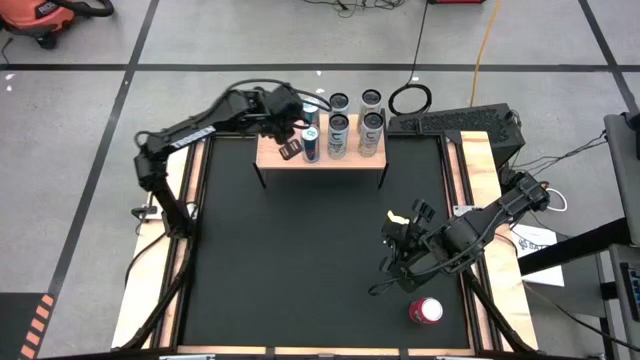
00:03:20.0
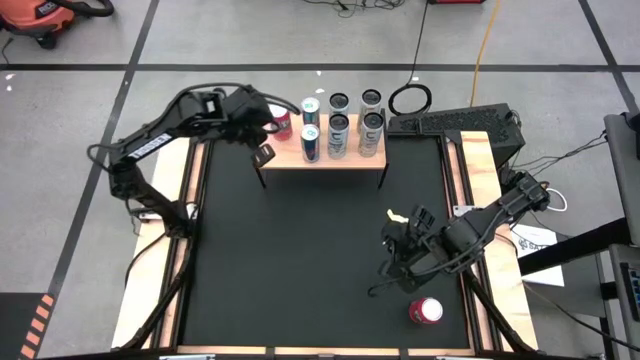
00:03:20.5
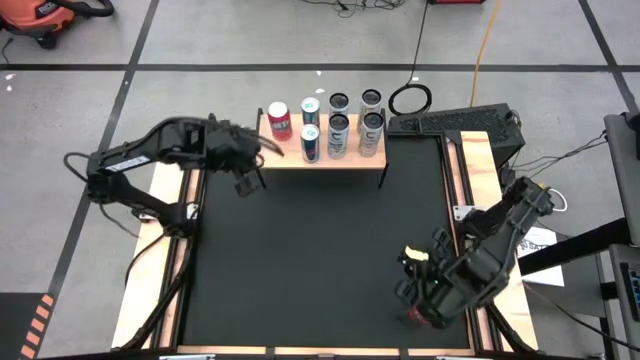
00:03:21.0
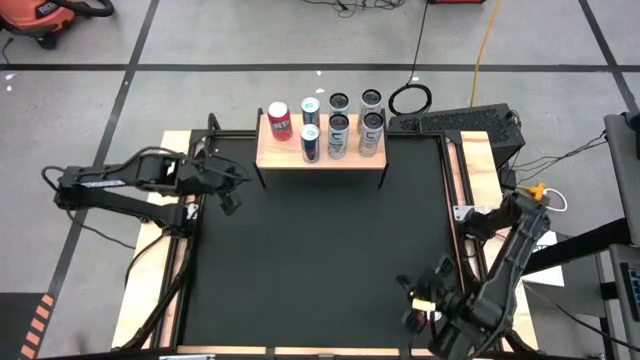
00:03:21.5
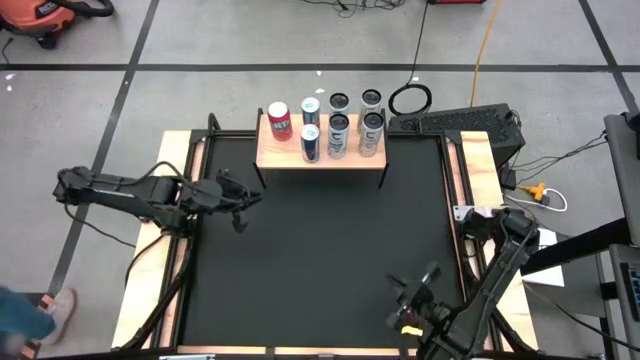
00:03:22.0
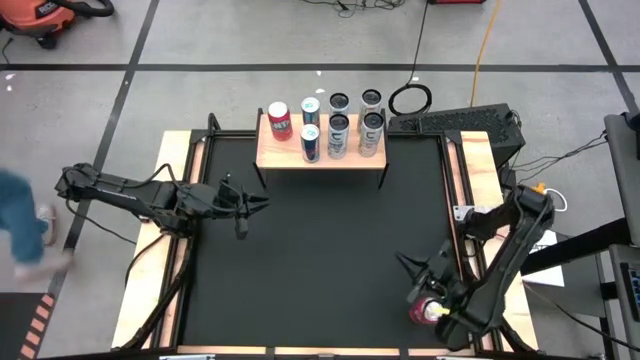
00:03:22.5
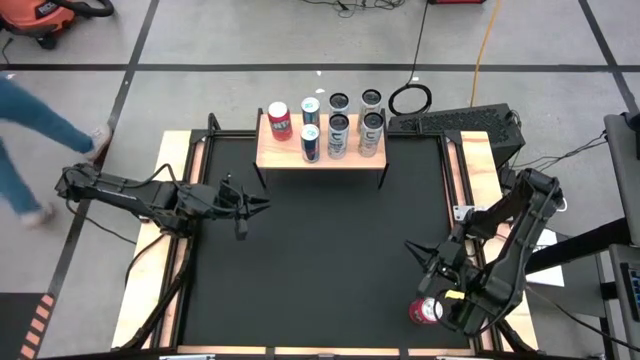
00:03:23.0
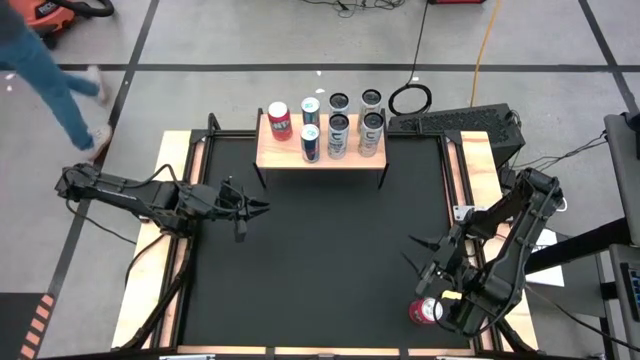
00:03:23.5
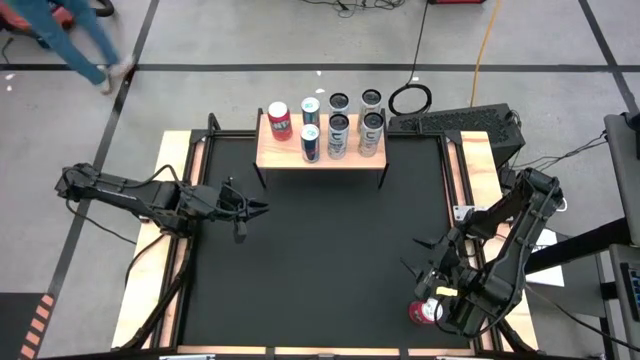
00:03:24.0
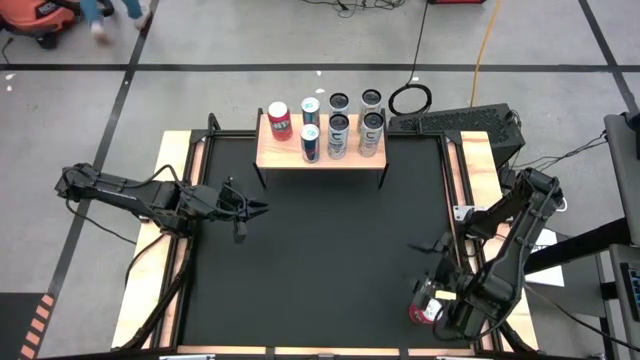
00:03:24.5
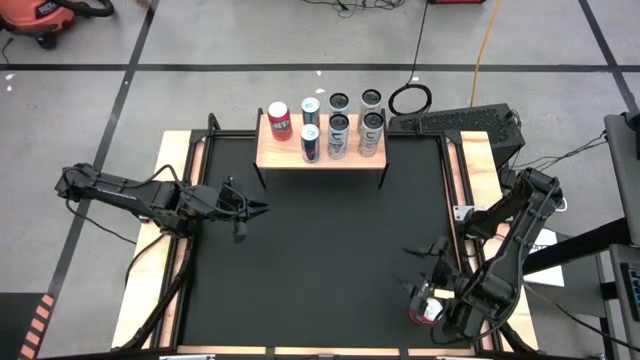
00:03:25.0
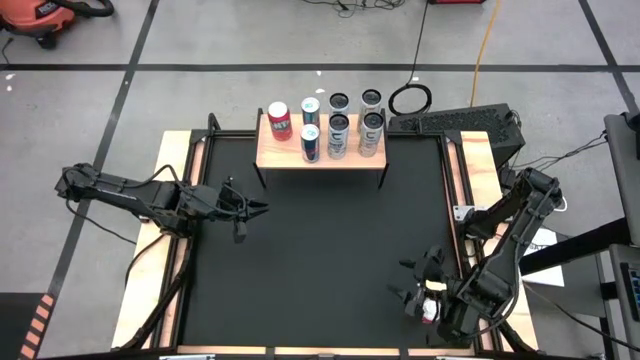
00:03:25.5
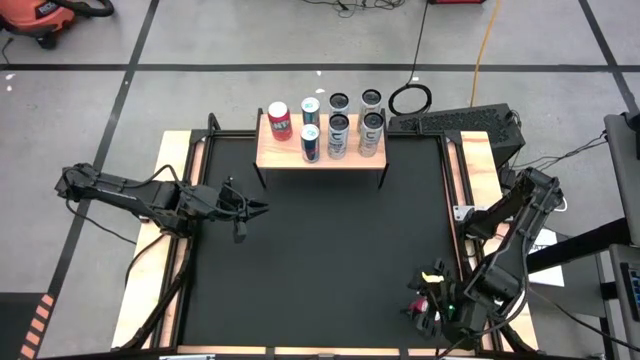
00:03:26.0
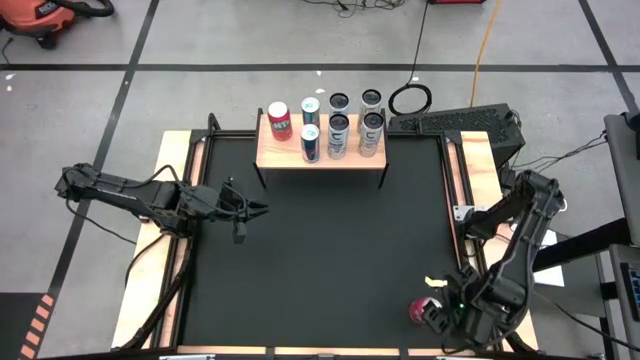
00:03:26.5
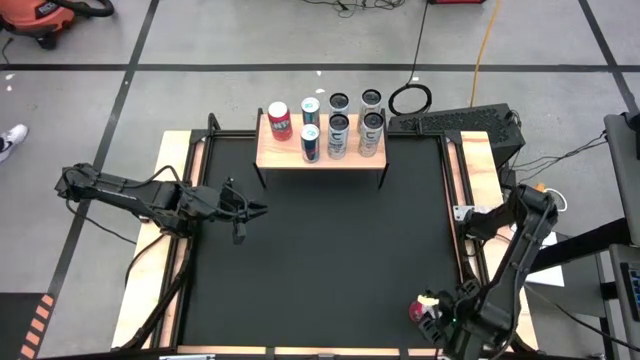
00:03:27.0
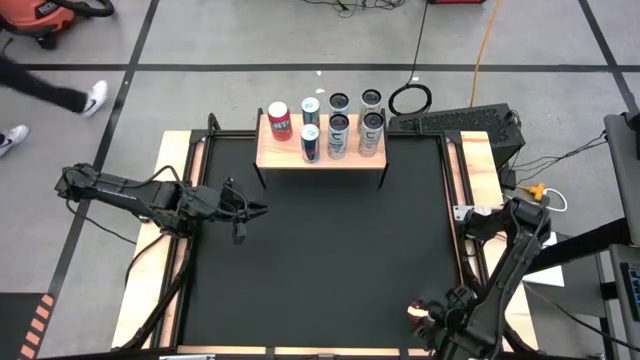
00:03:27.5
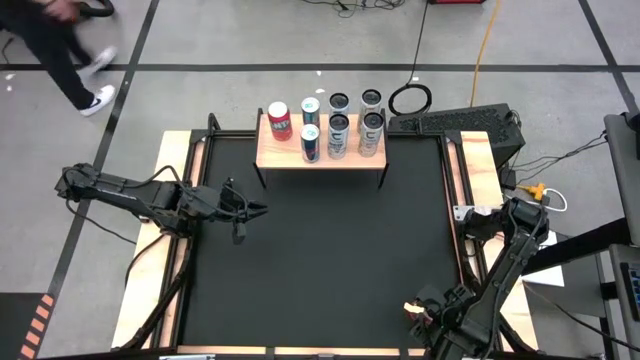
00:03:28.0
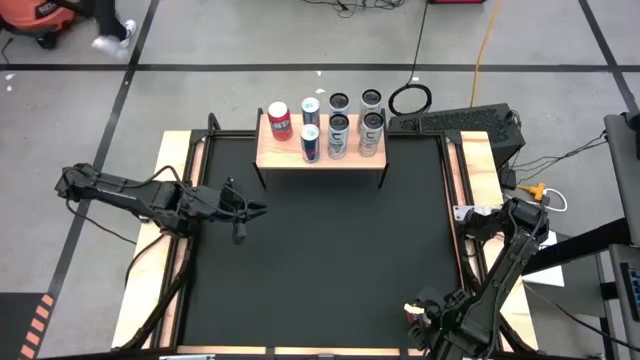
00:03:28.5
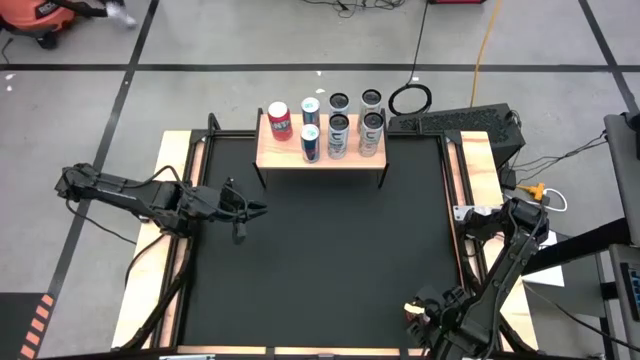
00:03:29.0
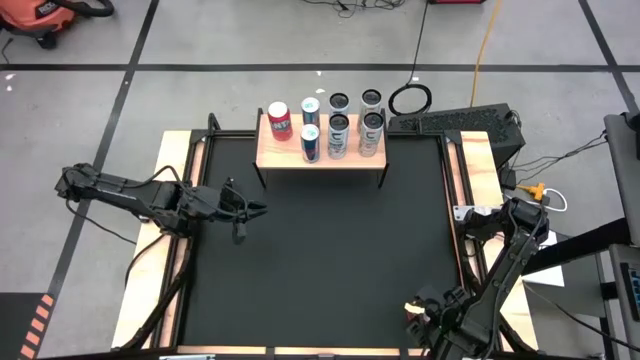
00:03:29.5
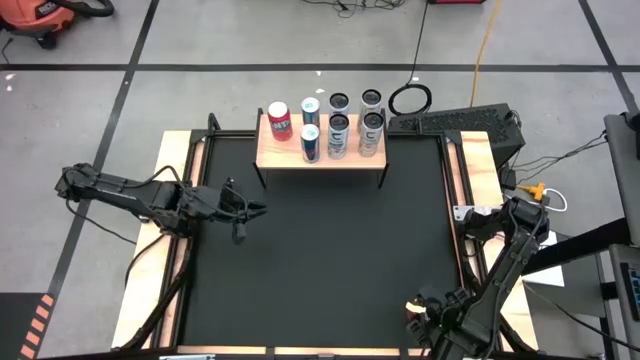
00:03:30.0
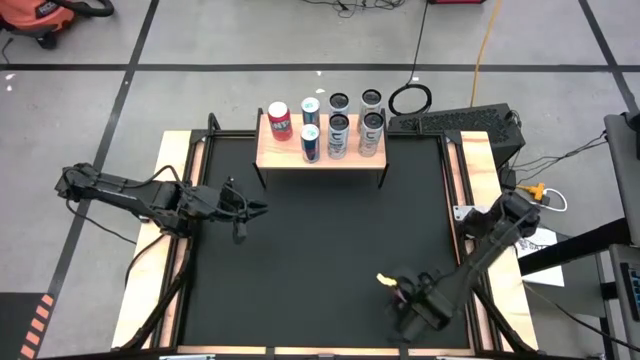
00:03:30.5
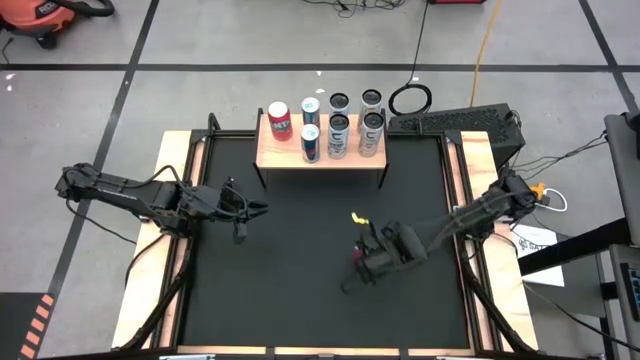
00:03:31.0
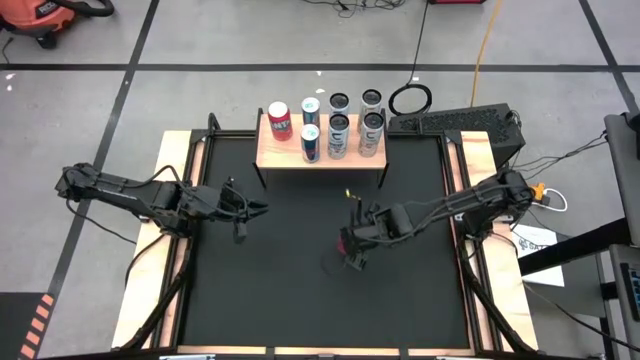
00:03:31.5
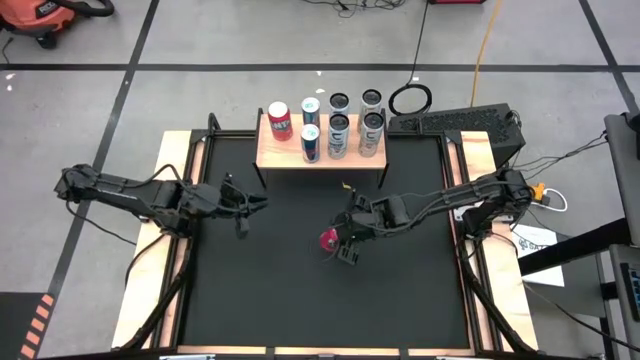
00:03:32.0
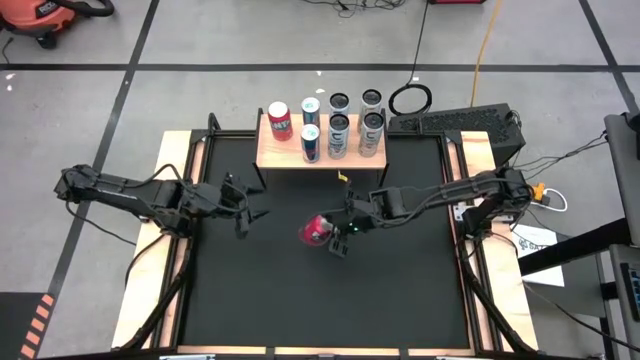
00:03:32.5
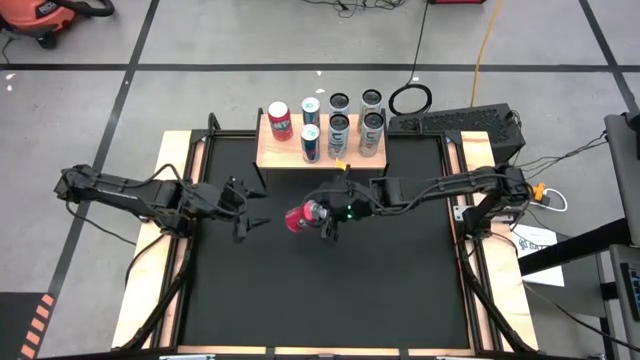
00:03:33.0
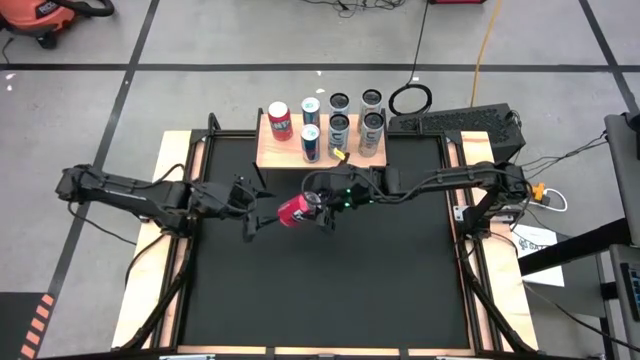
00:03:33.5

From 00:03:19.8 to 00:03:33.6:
Task: Place canned beverage on shelf
Put the red soda can on the shelf aligned with the other red soda can

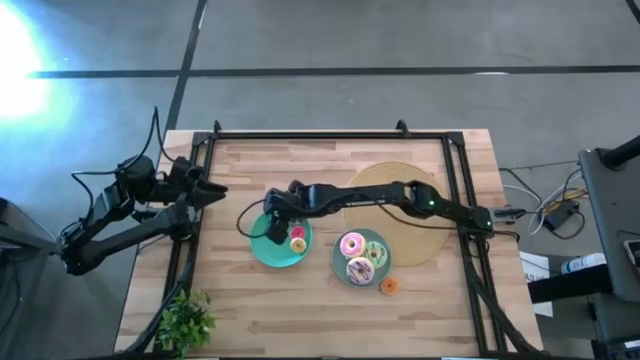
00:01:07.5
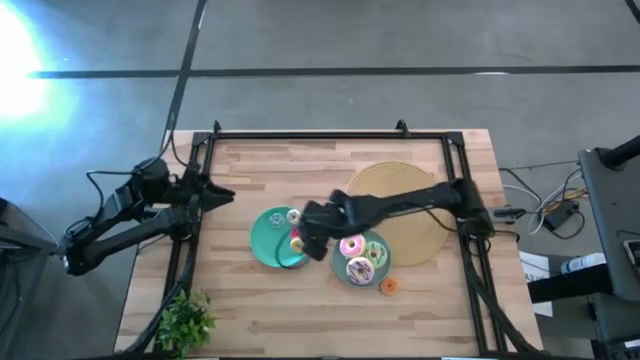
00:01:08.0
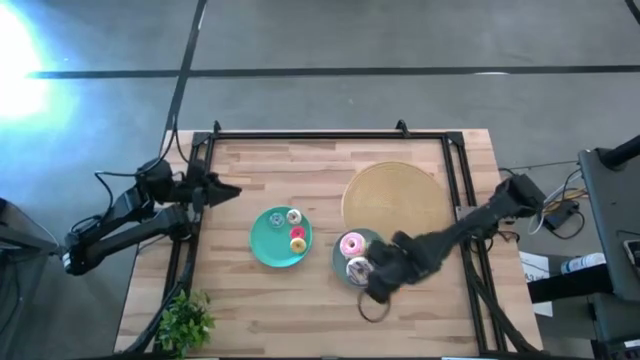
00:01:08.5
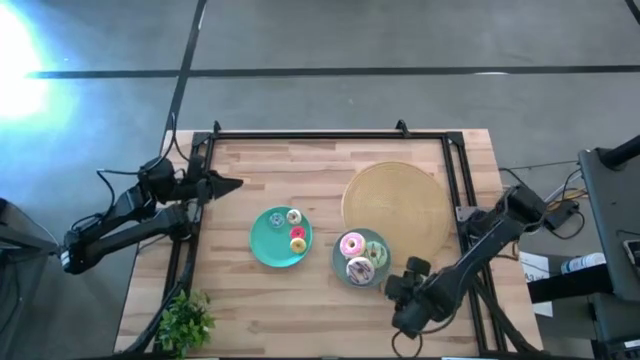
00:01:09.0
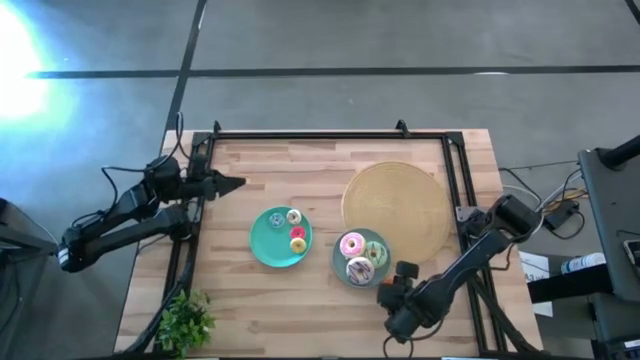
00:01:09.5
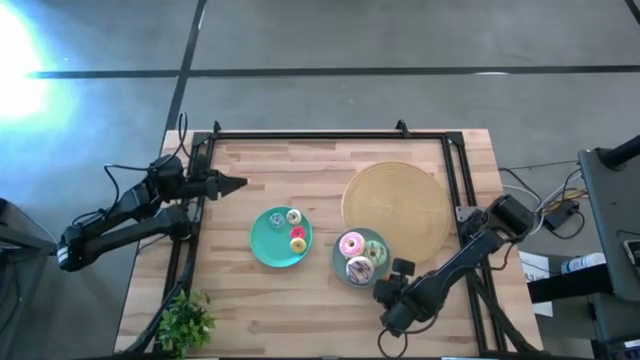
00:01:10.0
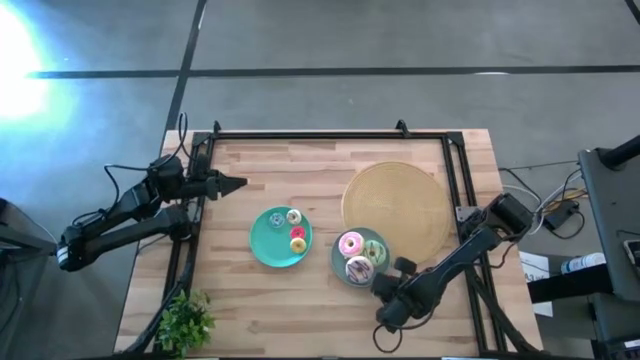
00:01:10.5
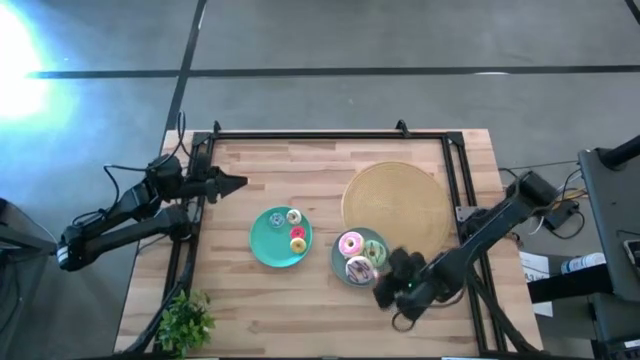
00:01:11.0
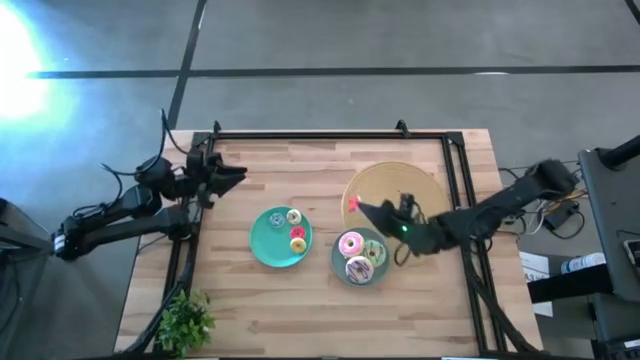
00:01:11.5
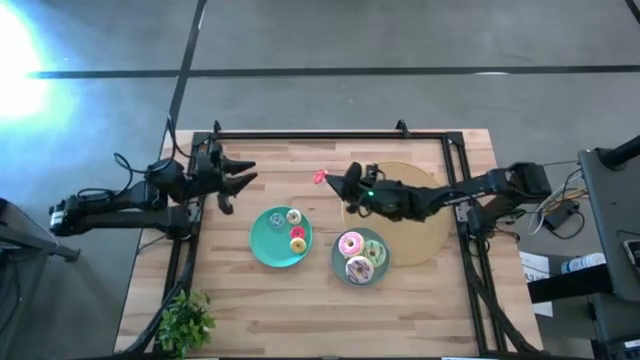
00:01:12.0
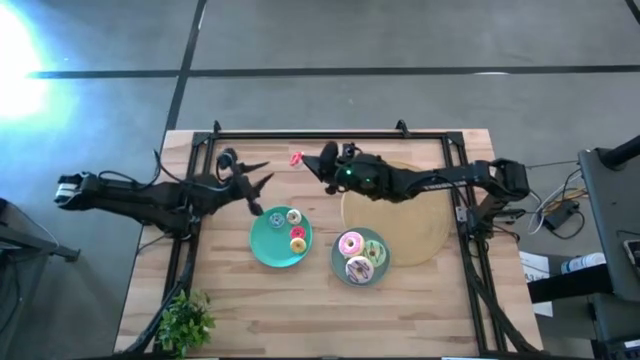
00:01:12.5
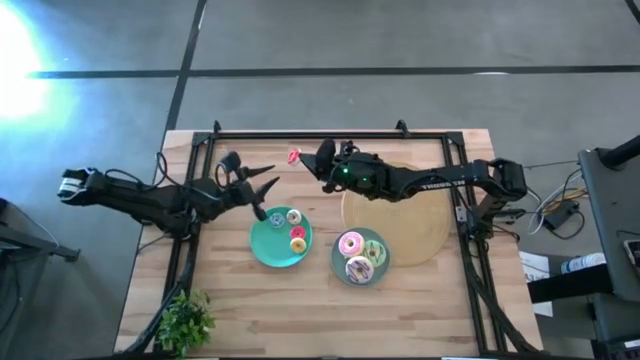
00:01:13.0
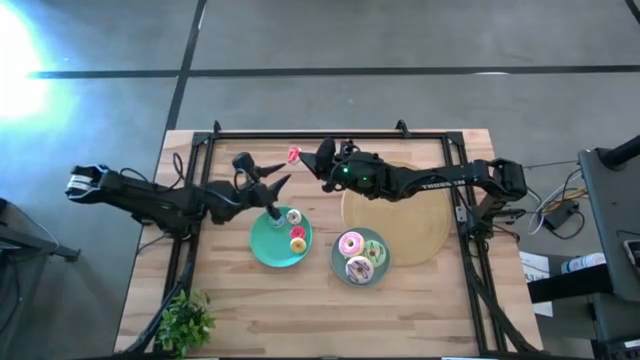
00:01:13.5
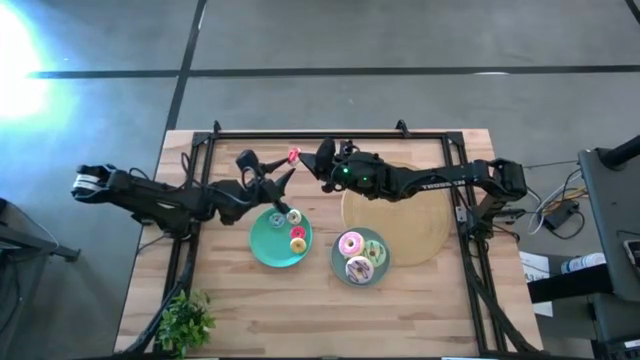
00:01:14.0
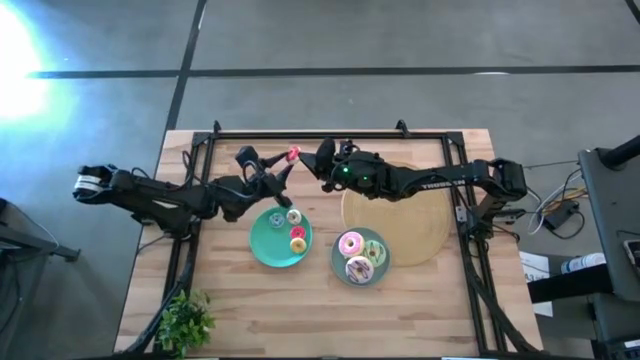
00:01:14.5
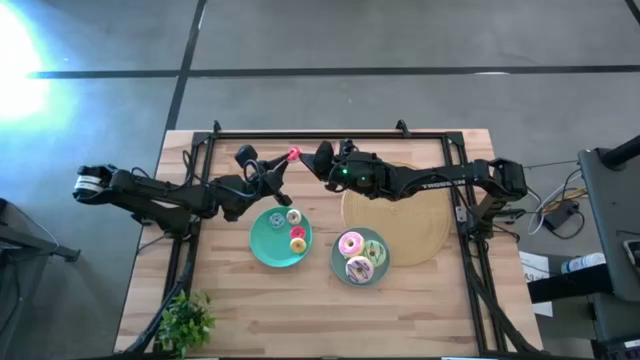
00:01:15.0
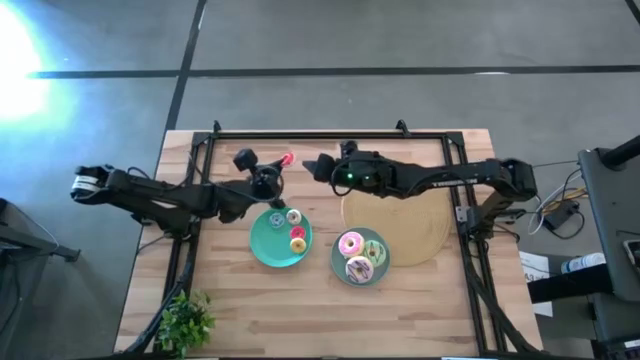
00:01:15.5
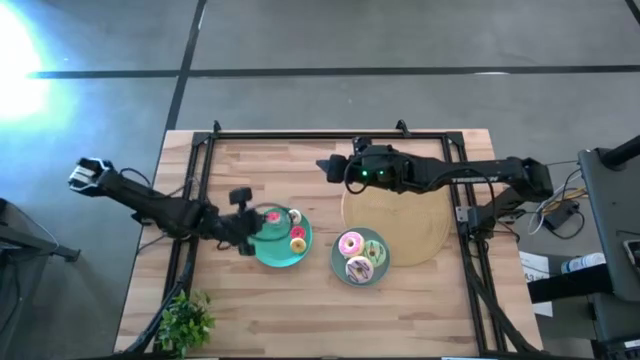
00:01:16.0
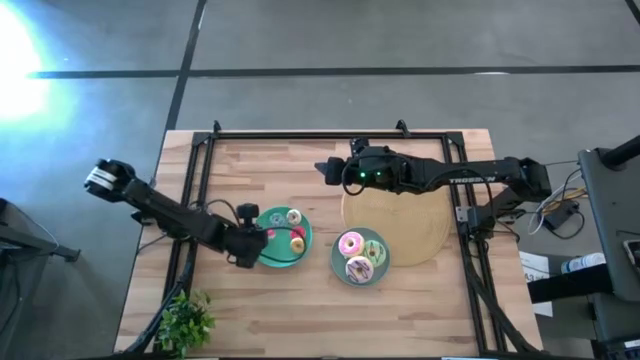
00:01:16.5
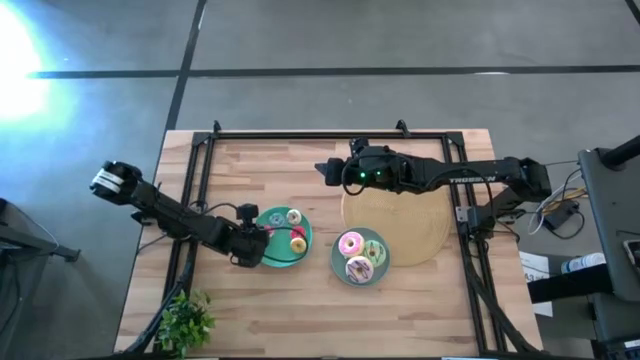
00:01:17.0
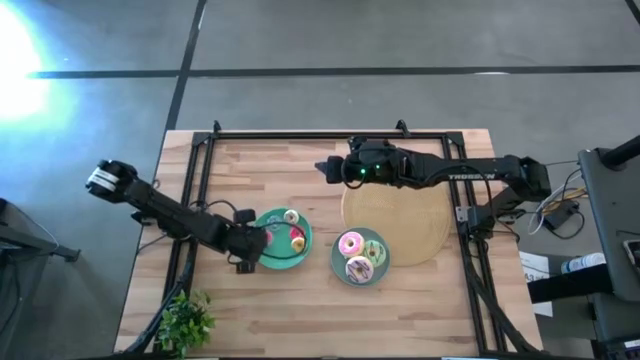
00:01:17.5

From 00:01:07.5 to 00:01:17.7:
Task: Pick & Place donuts
Put the small orange donut on the green plate
